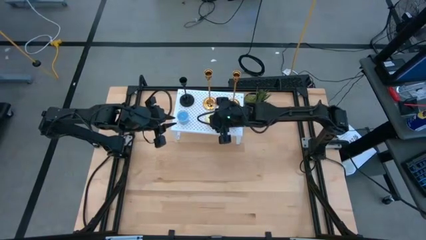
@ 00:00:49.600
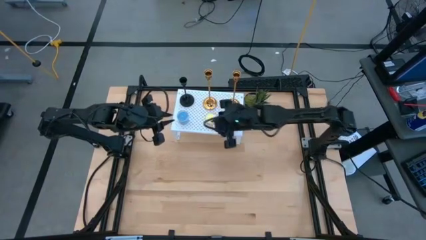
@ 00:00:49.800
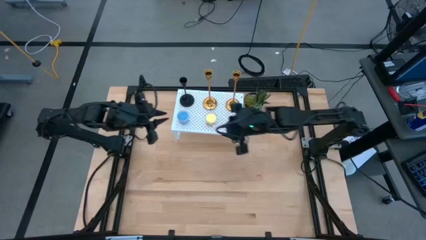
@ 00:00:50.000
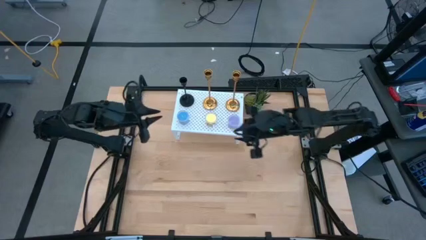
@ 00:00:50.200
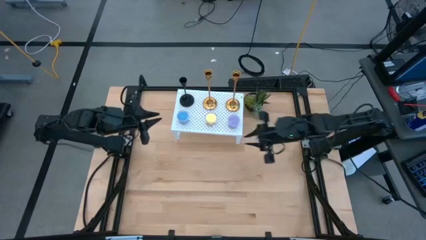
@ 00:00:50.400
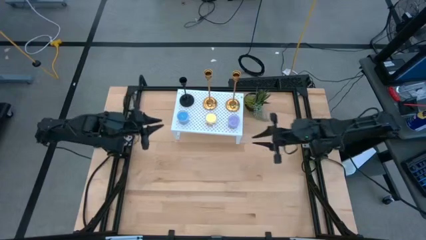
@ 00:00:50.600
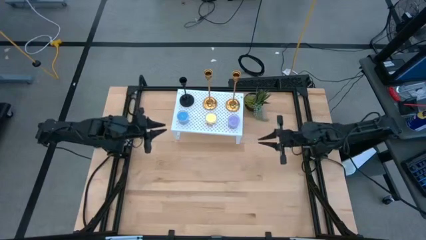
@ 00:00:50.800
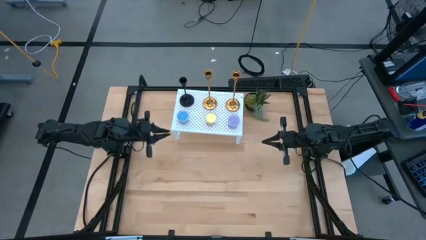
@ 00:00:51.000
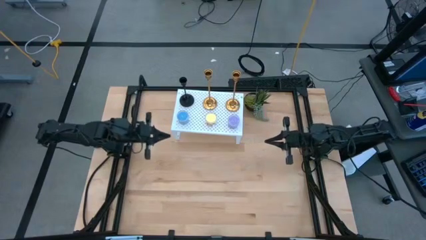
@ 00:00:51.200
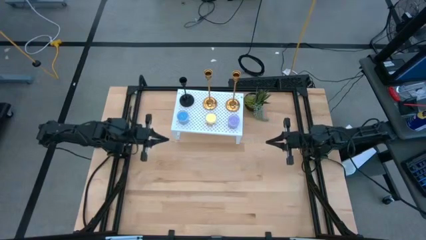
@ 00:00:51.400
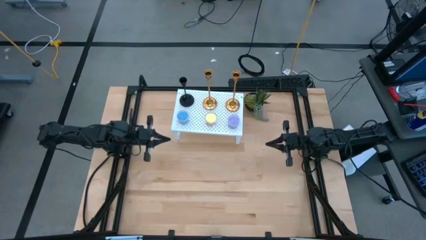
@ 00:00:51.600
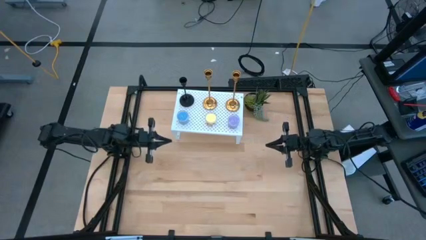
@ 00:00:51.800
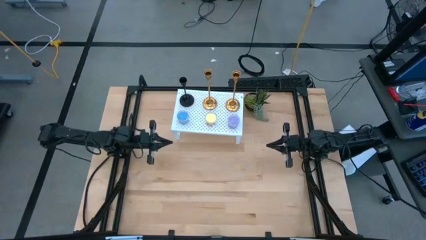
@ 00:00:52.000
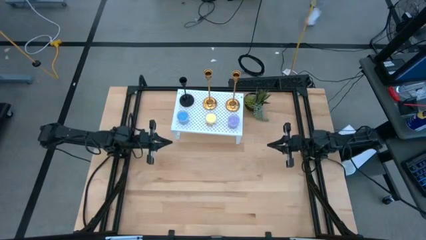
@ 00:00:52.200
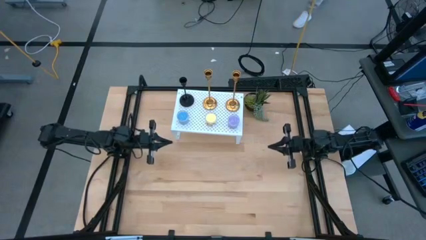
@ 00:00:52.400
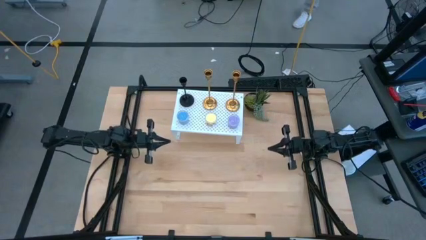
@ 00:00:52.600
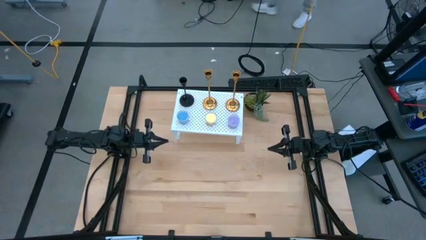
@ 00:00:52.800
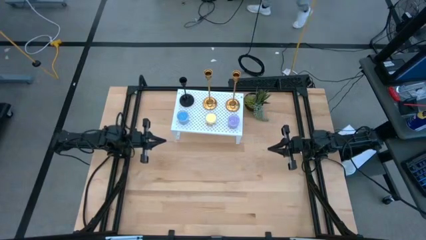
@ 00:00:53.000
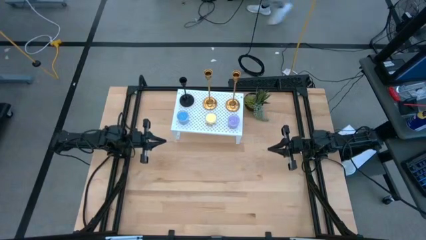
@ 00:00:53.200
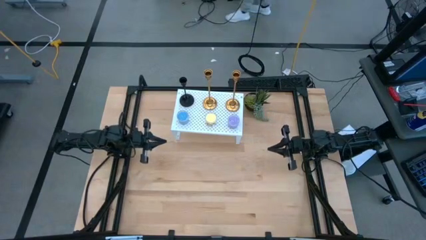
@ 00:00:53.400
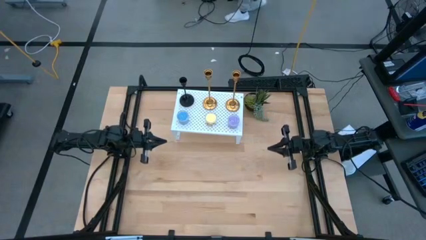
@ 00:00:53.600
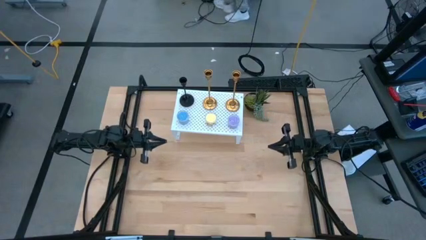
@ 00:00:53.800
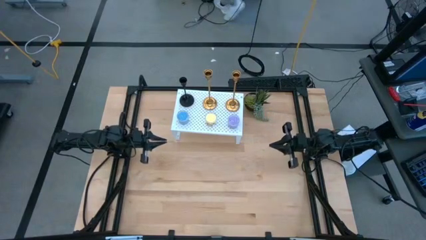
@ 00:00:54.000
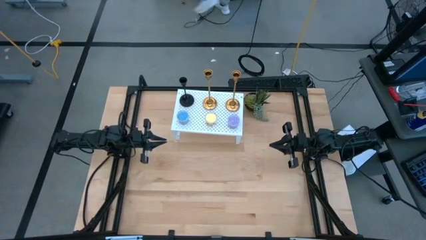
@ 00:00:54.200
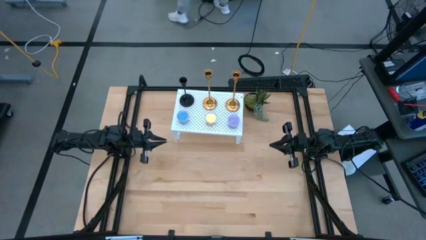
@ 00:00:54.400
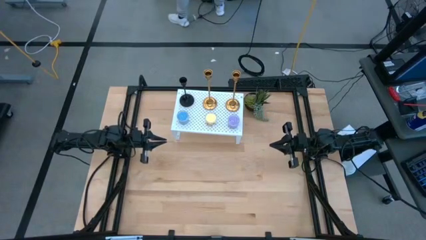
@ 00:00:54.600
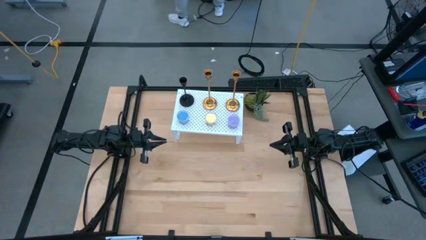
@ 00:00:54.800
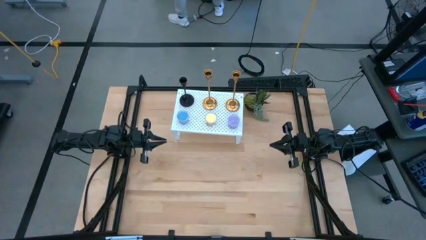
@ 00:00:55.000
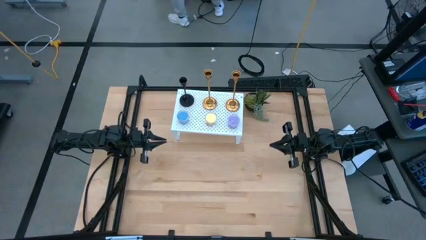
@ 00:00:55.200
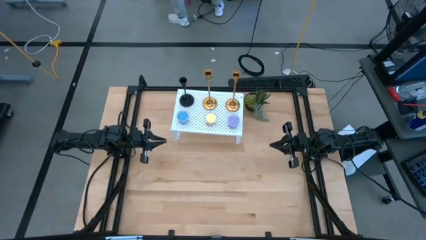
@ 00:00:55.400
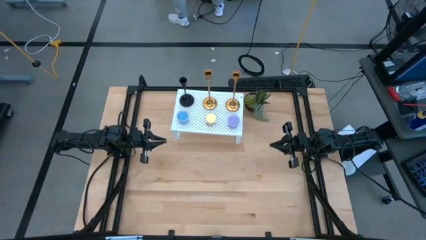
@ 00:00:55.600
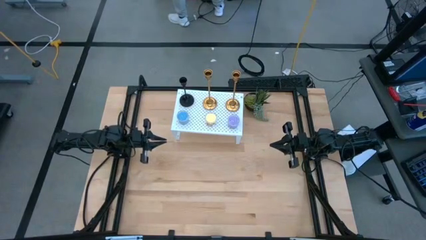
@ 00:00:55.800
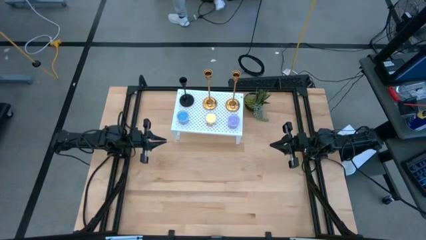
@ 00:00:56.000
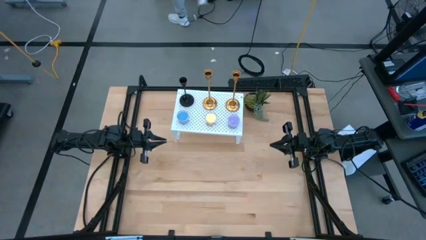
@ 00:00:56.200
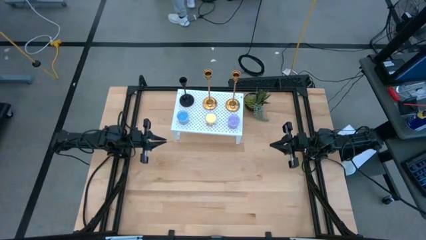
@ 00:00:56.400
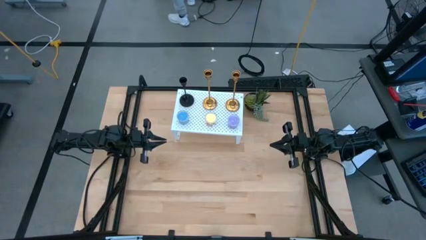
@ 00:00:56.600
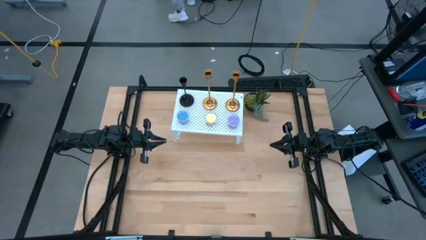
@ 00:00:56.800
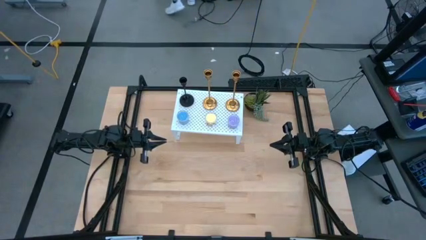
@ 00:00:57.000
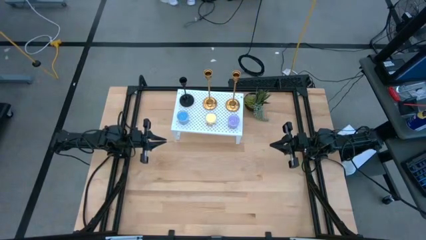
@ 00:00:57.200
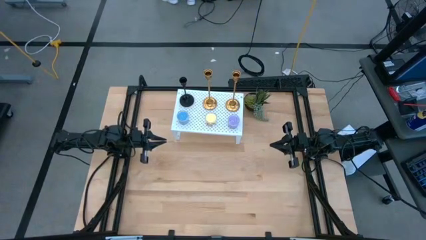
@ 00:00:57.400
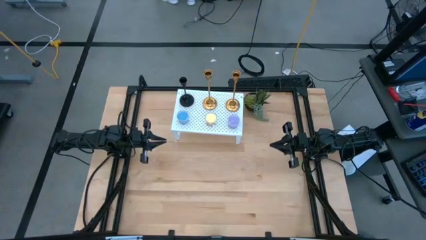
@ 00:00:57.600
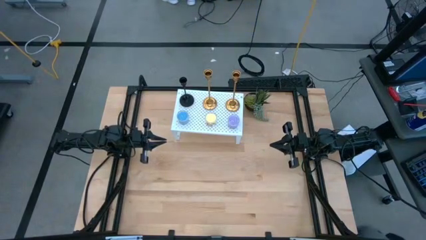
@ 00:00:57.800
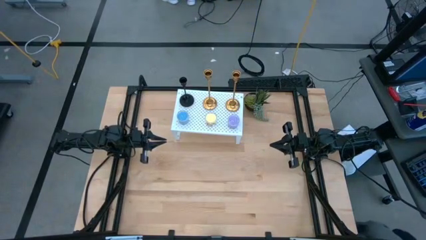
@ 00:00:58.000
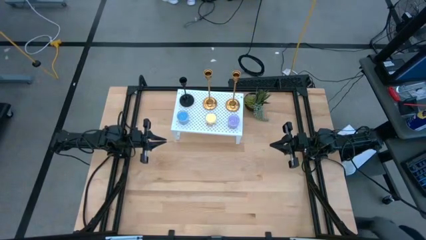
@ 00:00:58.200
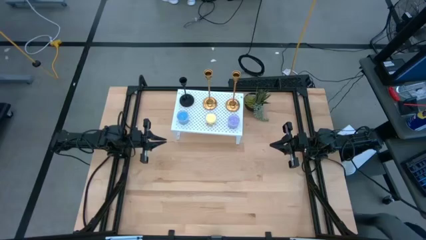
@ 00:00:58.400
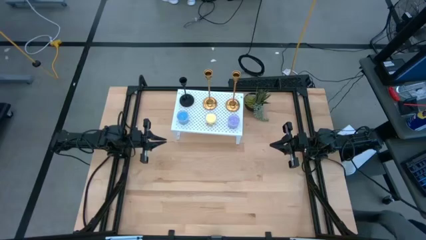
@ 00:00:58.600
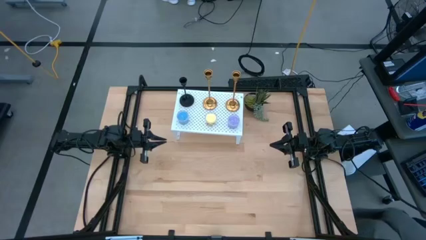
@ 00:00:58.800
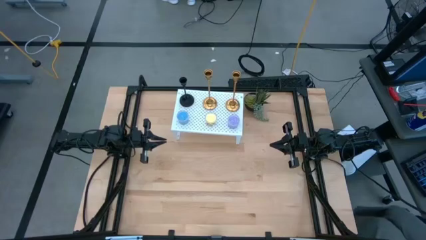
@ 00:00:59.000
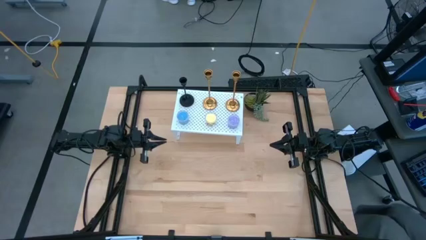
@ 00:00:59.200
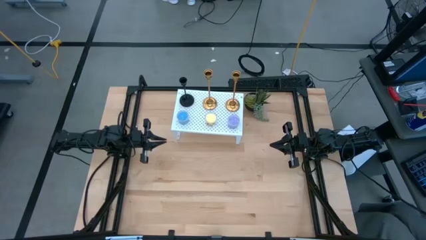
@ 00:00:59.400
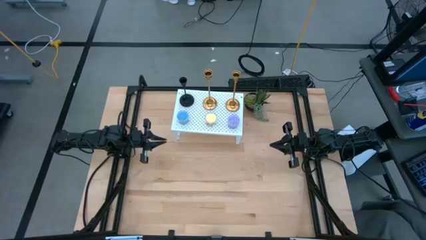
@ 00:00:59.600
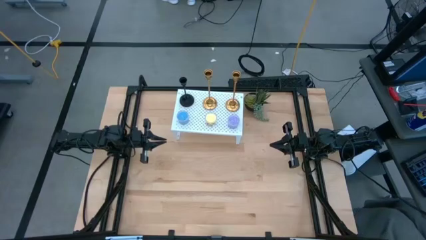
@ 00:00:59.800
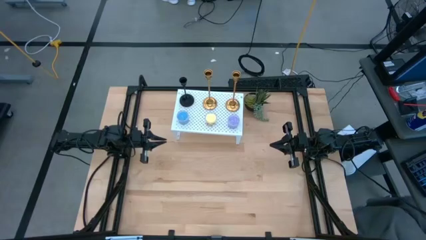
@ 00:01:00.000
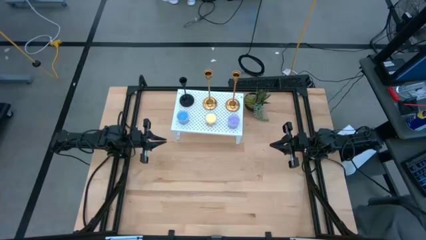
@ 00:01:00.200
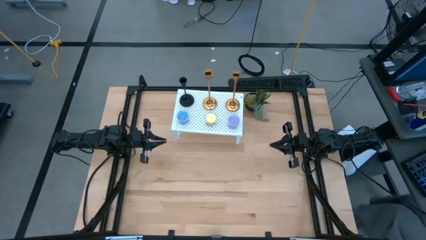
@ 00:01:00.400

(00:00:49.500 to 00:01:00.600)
Task: Pick & Place candle stick holders
Return to Home Position
